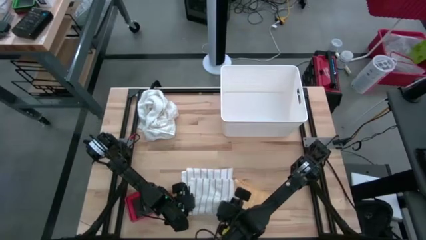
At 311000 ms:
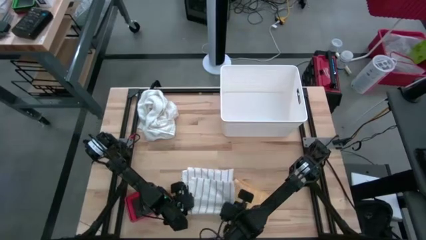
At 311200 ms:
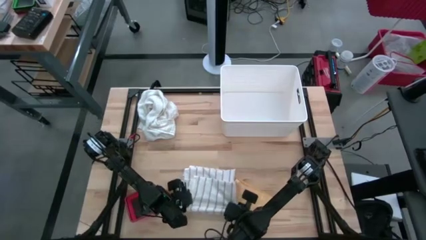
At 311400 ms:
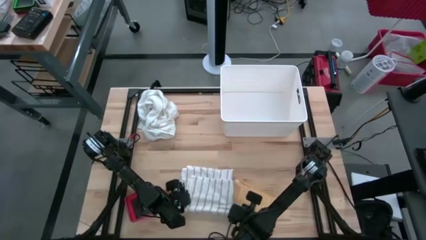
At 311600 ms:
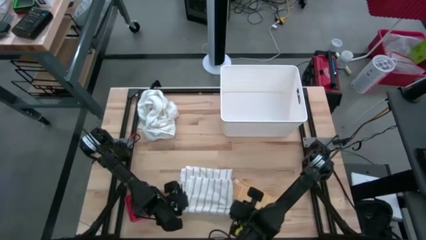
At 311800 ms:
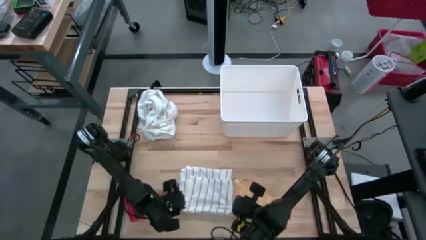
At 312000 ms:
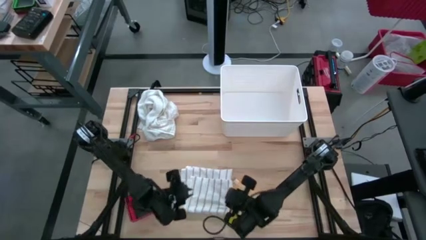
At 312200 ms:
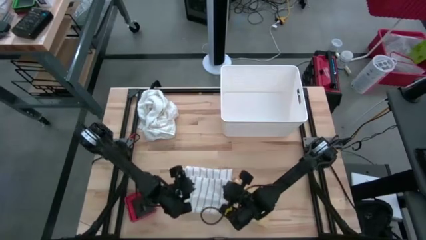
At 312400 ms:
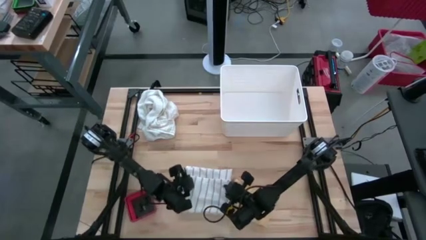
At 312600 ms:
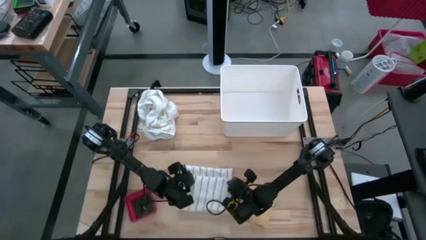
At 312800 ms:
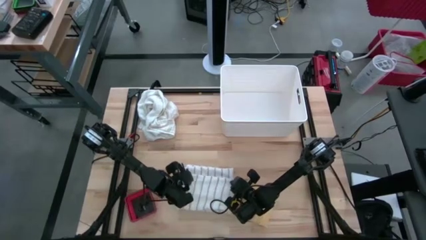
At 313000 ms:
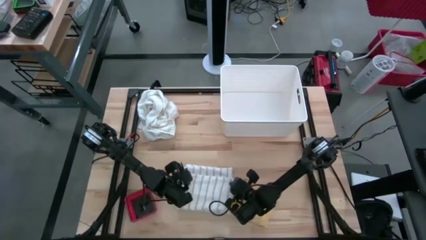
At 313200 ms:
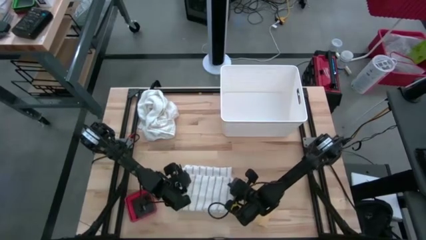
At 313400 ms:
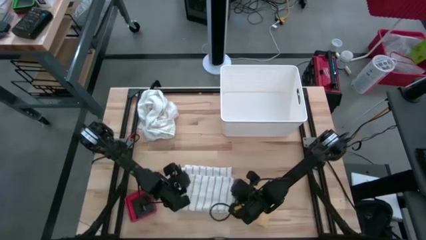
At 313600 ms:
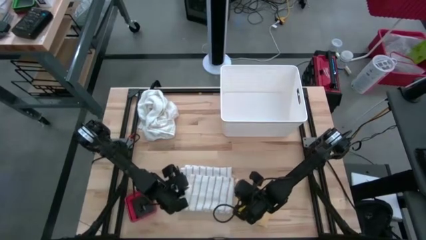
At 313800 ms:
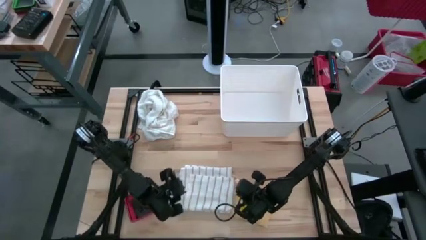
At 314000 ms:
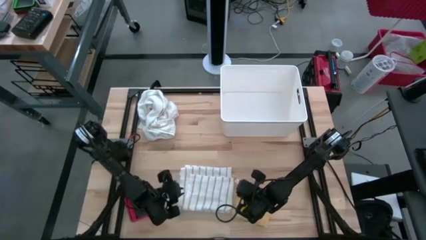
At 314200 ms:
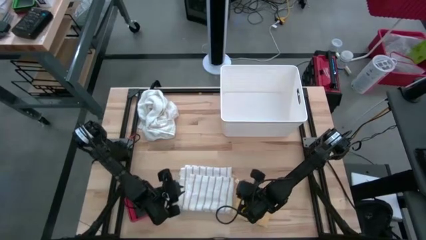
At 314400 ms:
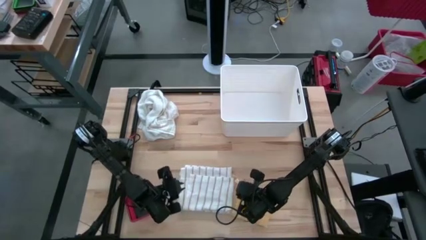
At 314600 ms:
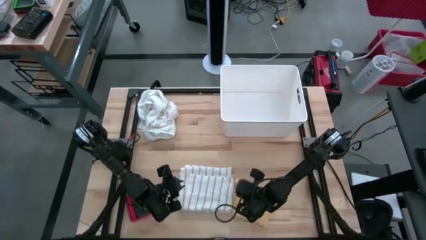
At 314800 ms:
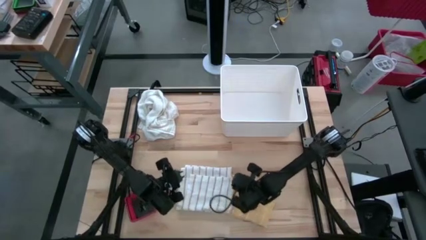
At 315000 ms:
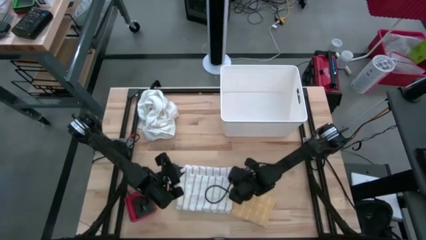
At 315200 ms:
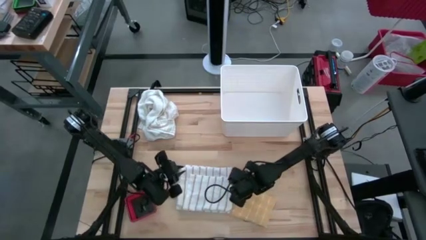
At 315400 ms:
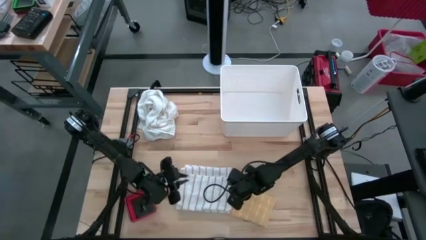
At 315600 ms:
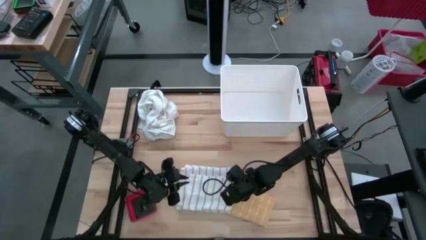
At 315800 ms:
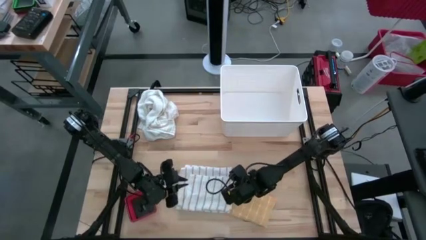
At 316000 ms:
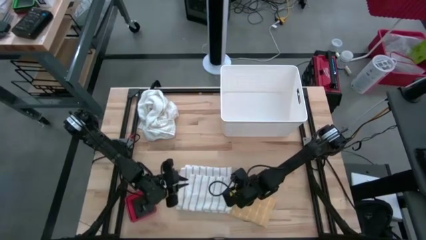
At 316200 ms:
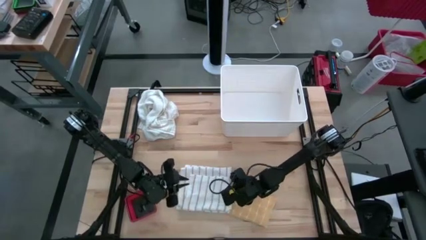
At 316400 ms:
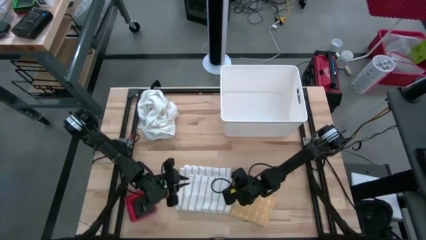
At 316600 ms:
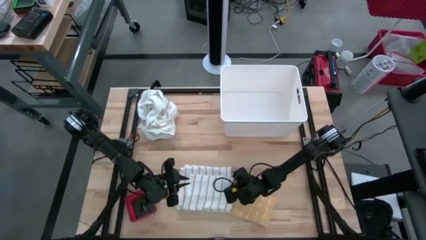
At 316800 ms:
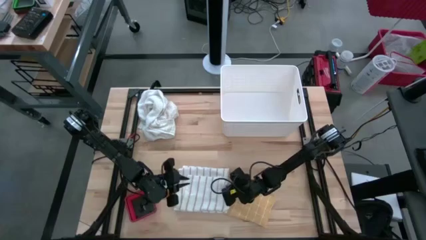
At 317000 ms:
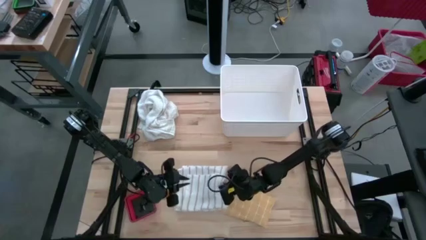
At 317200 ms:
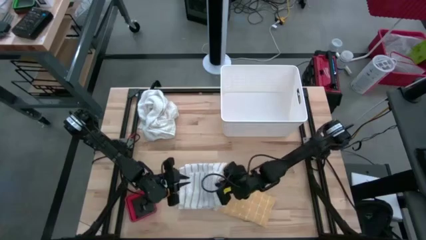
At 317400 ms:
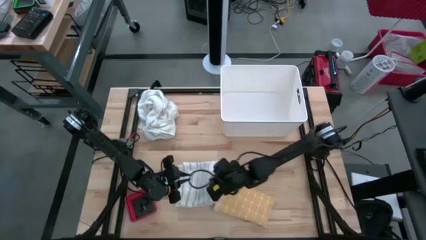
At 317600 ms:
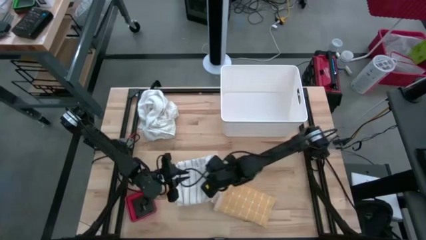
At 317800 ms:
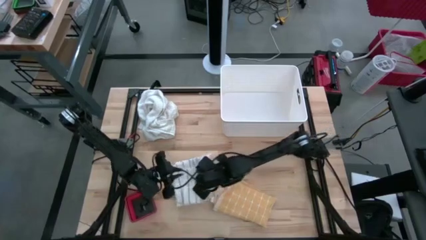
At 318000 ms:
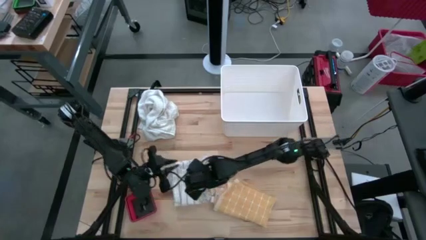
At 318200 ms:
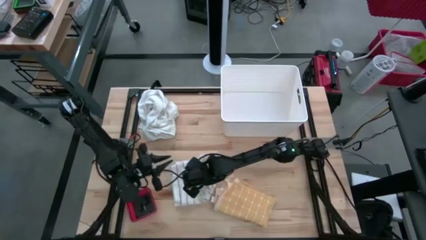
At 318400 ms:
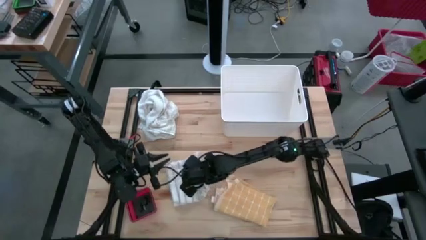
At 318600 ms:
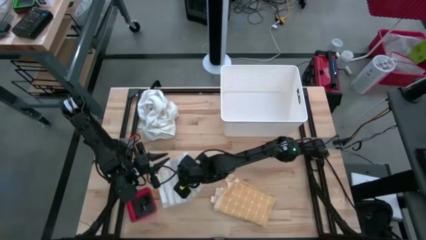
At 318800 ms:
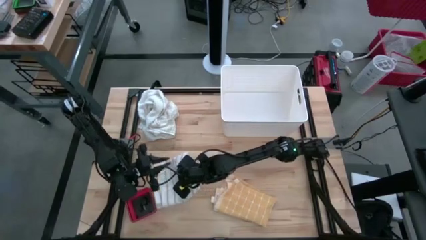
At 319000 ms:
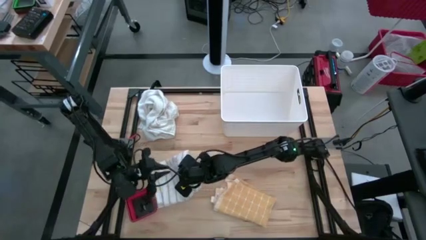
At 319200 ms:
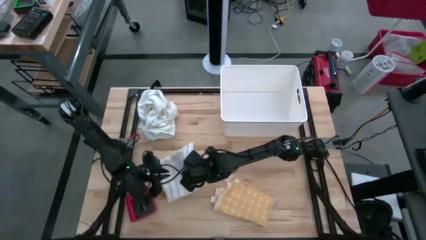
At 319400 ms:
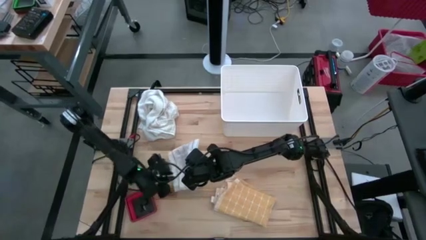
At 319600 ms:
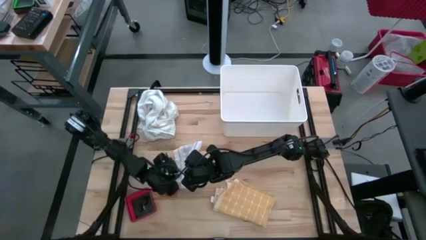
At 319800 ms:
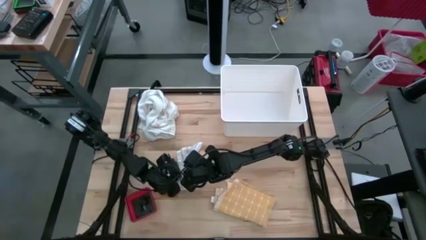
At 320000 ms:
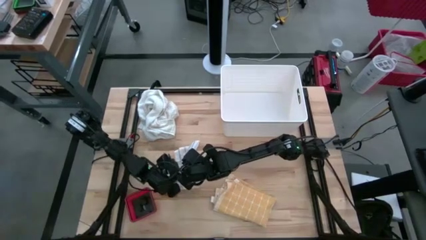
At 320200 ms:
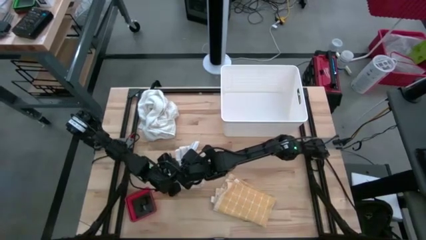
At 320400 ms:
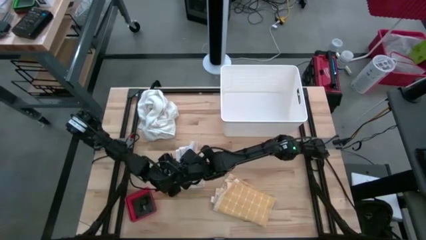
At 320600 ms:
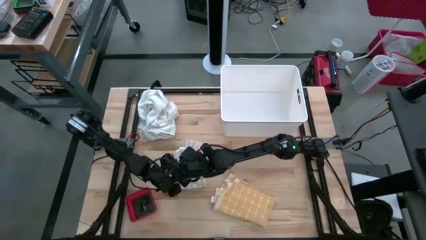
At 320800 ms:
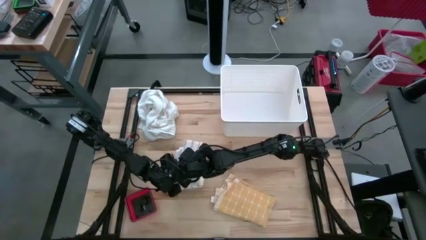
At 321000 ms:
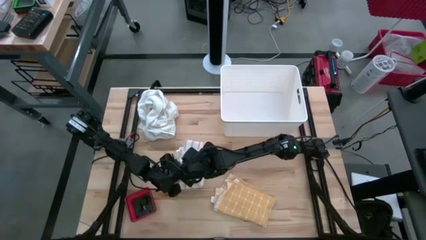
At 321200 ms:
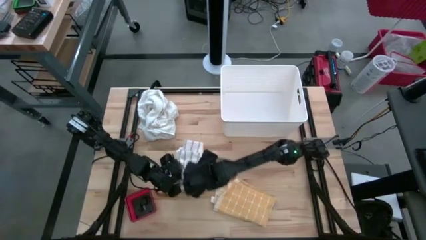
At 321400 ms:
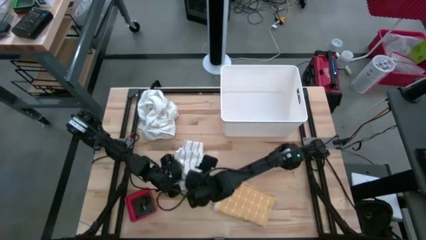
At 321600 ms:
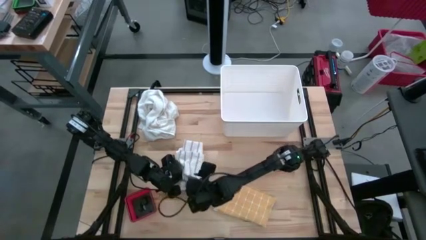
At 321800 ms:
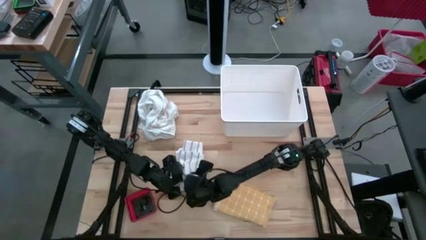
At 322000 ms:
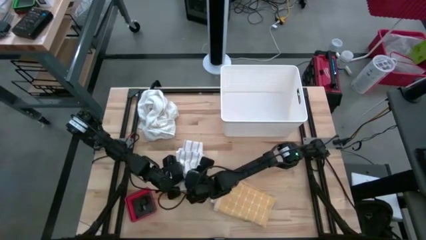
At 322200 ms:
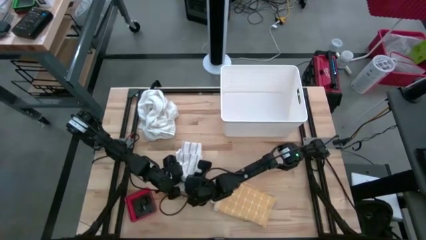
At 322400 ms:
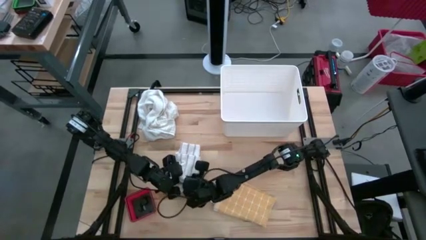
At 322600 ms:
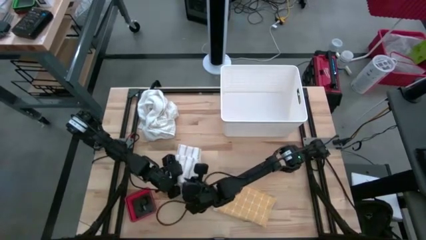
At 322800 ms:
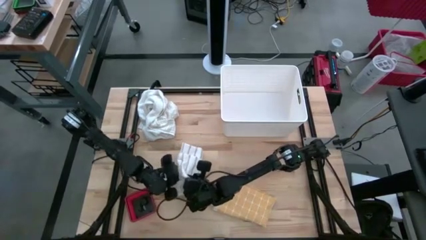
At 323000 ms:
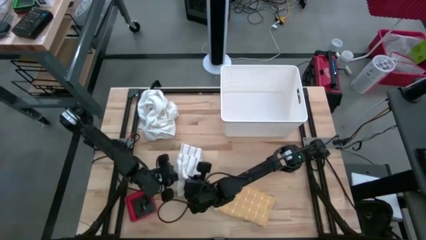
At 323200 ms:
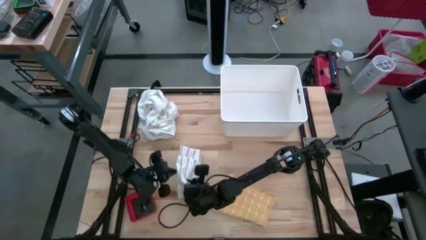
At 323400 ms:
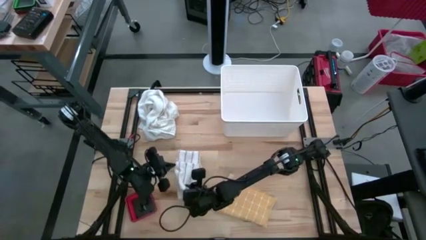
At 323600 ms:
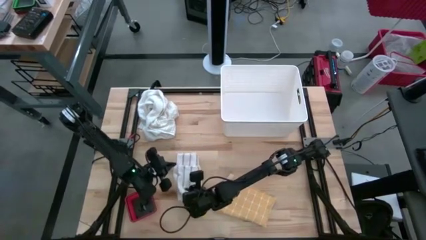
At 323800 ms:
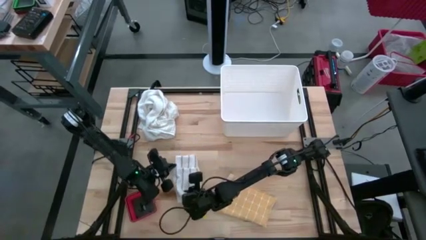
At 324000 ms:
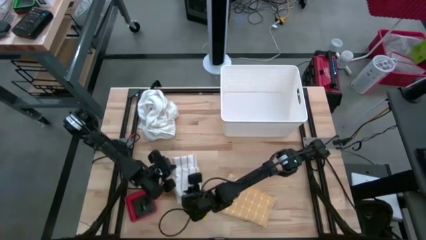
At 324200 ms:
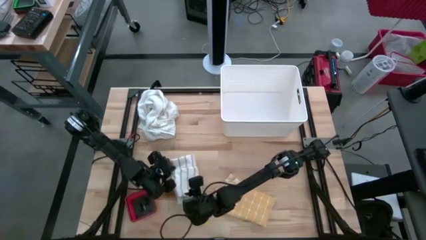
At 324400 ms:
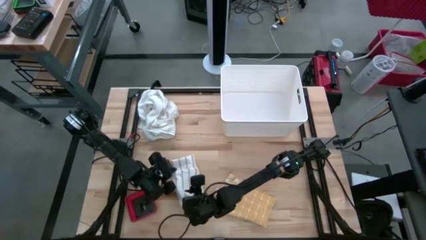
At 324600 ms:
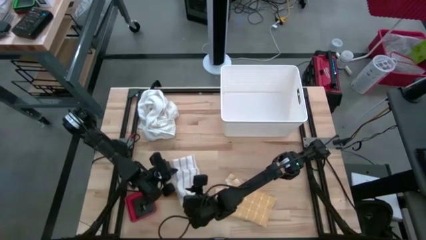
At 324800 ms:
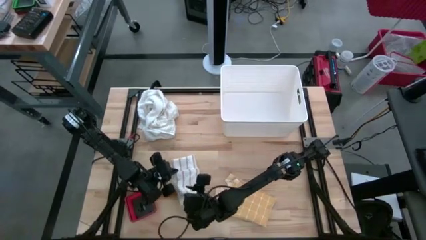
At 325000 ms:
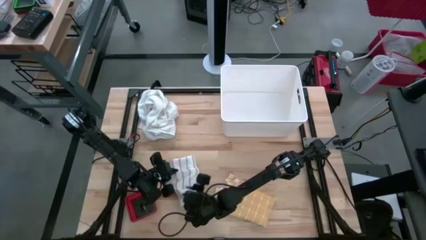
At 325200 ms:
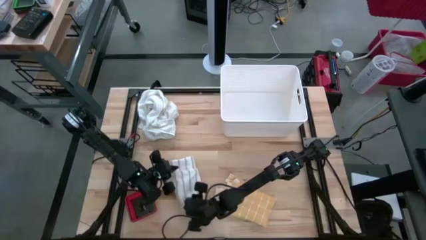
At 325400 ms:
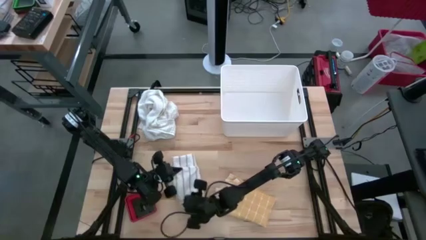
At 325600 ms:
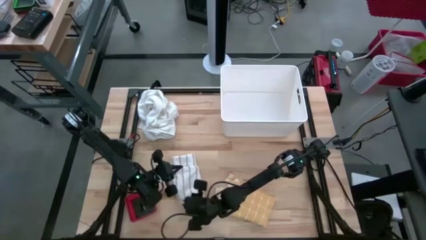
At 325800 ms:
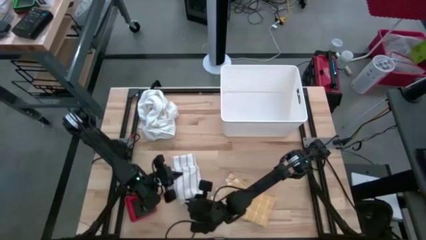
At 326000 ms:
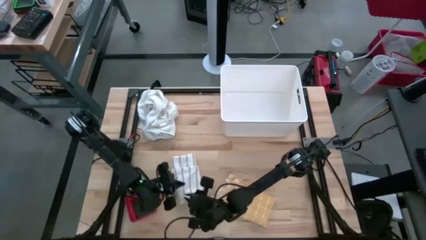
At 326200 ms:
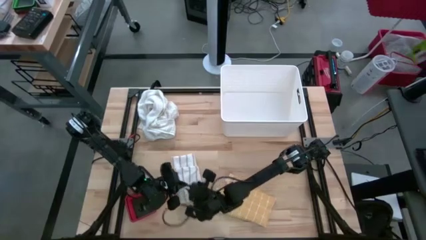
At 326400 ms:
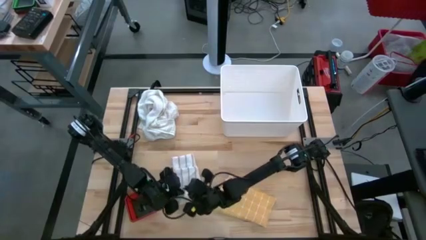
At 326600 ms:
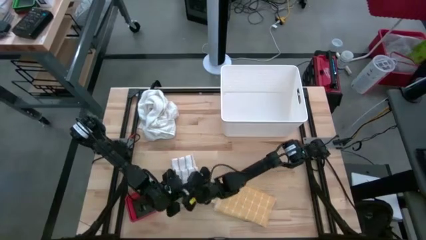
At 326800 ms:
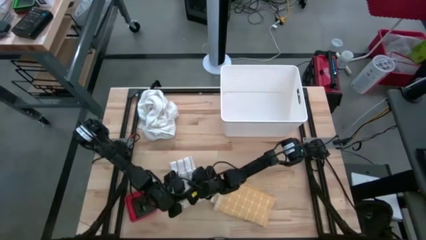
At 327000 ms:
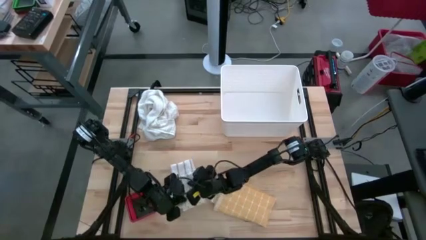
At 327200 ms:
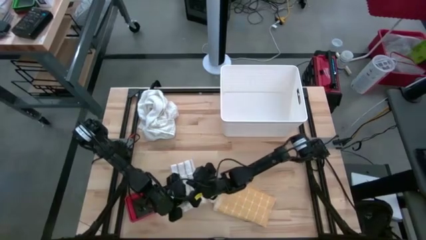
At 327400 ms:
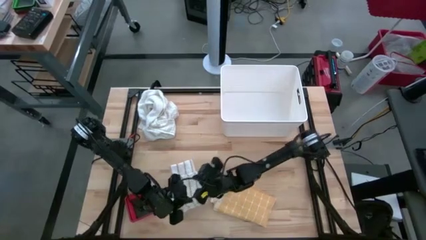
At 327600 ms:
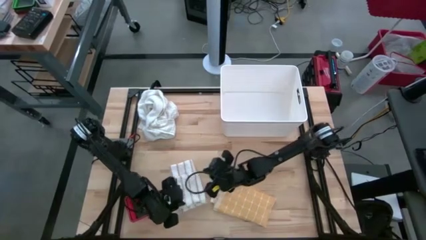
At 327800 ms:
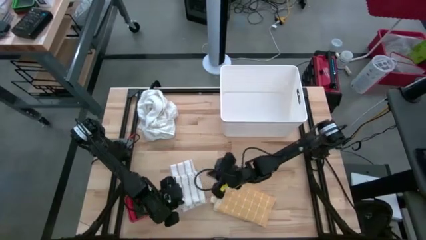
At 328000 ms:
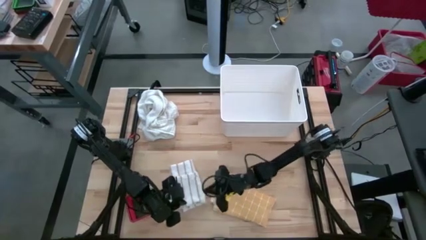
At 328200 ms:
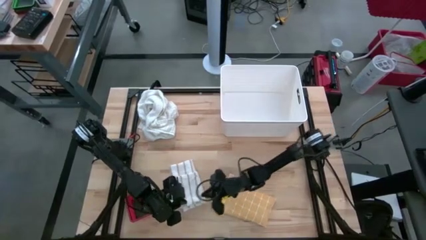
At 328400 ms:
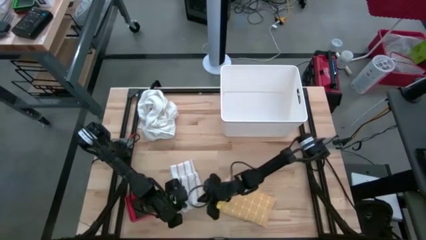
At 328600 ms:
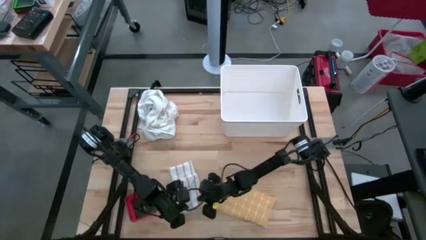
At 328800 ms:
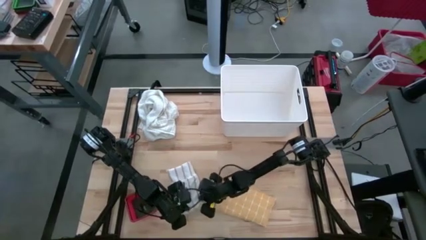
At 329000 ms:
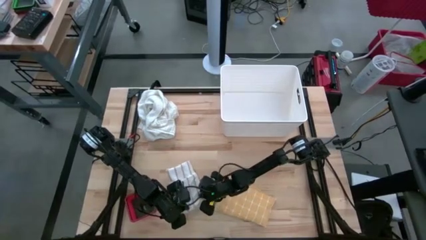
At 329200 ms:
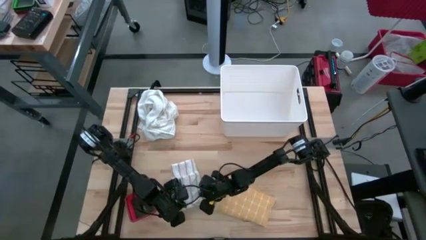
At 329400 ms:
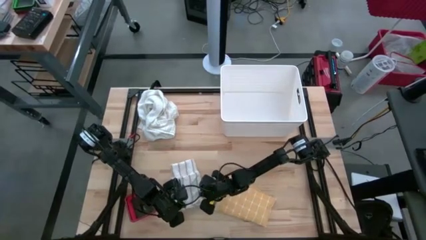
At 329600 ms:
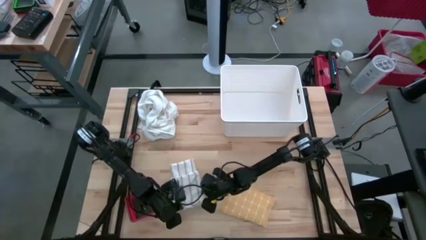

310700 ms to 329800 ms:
Task: Fold towel
Fold the white kitchen towel
